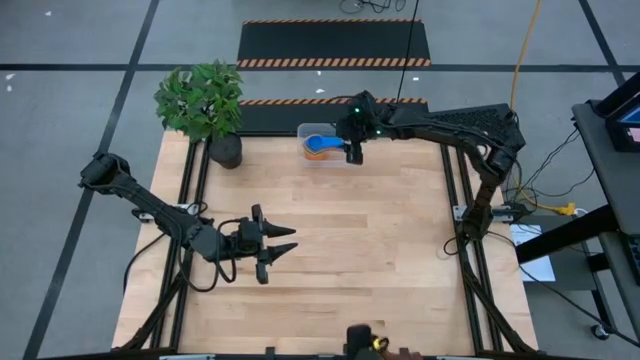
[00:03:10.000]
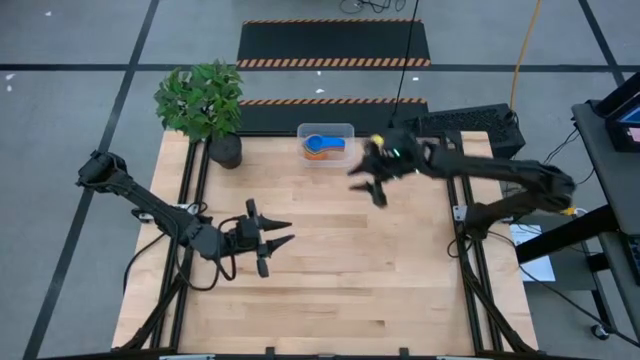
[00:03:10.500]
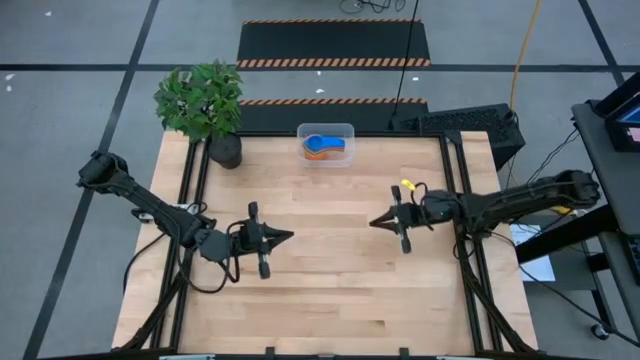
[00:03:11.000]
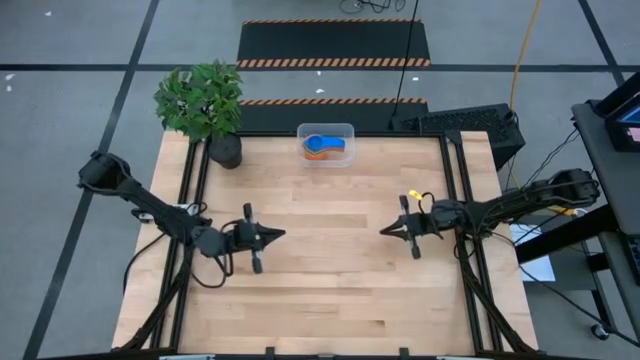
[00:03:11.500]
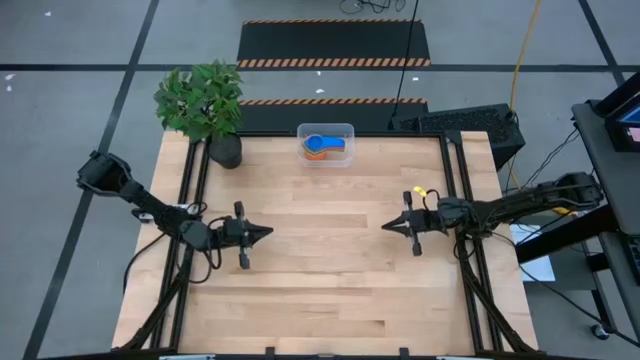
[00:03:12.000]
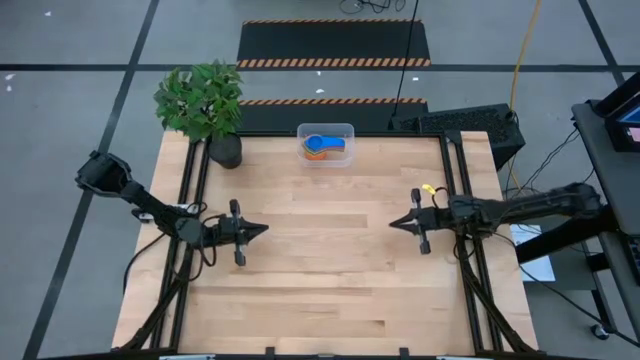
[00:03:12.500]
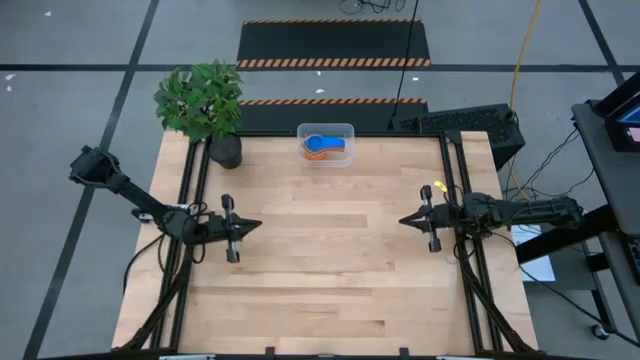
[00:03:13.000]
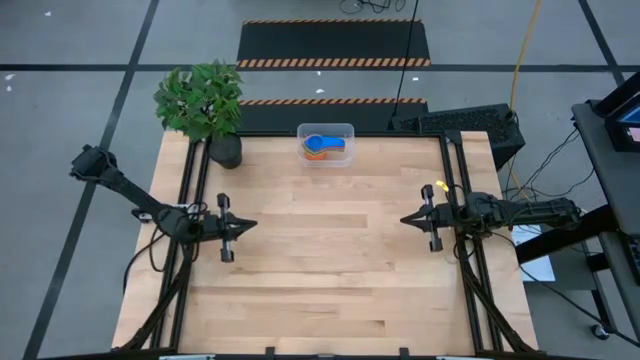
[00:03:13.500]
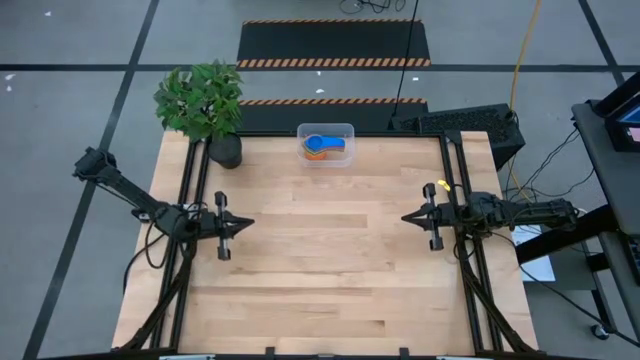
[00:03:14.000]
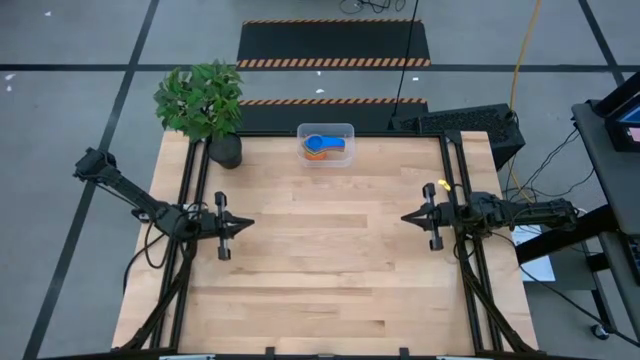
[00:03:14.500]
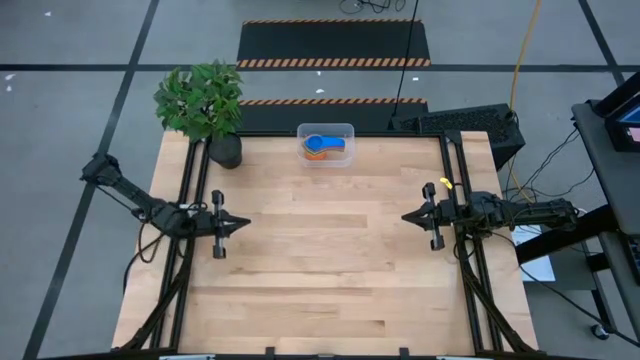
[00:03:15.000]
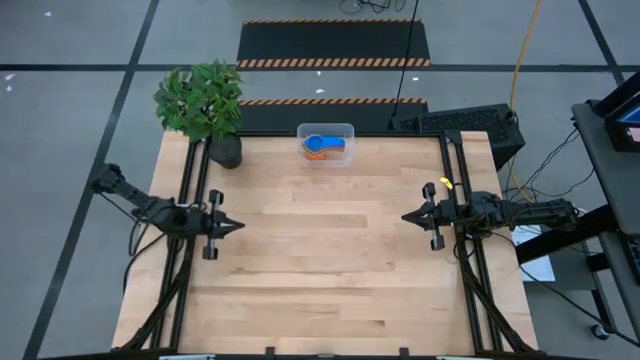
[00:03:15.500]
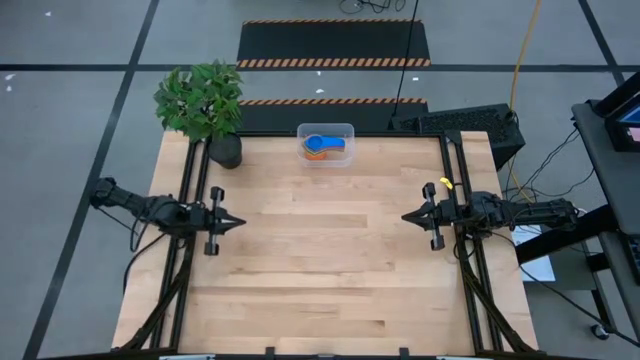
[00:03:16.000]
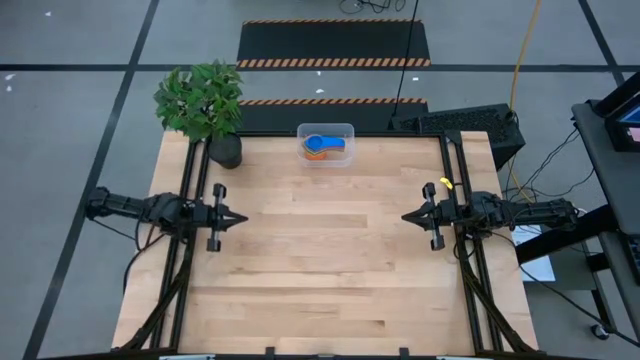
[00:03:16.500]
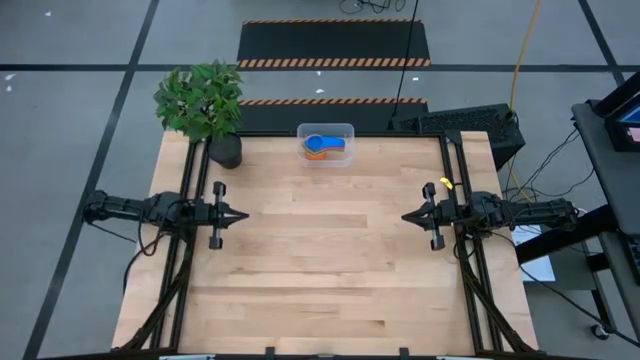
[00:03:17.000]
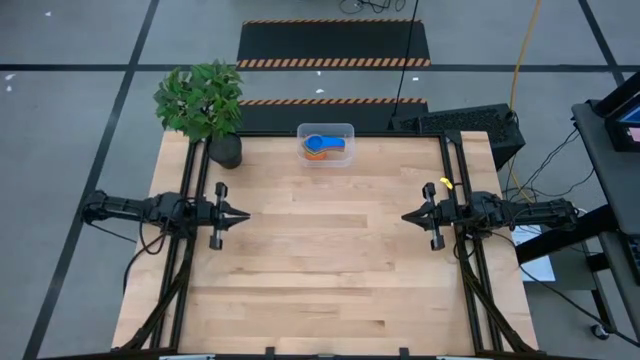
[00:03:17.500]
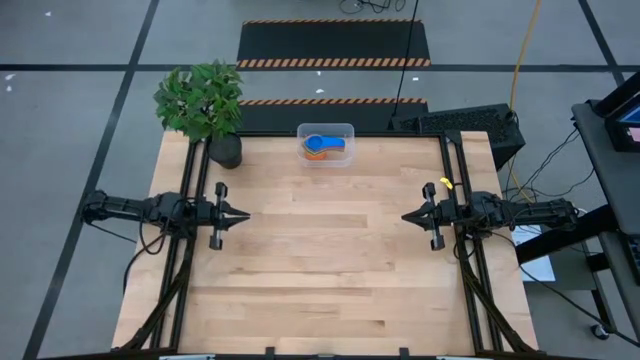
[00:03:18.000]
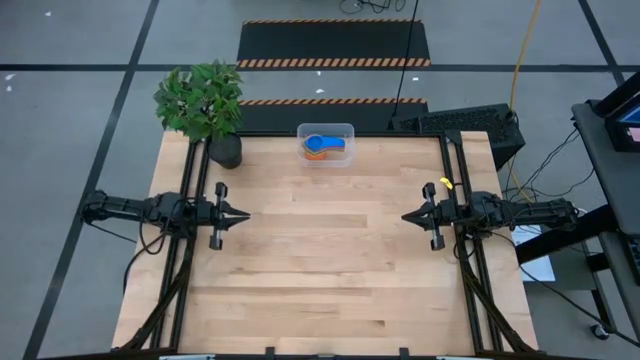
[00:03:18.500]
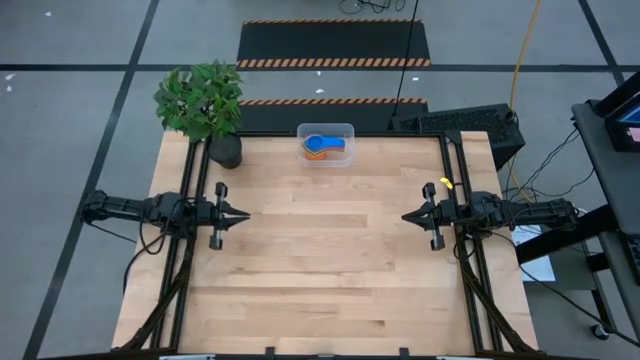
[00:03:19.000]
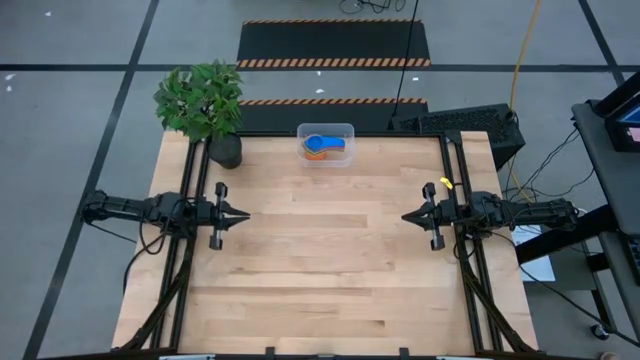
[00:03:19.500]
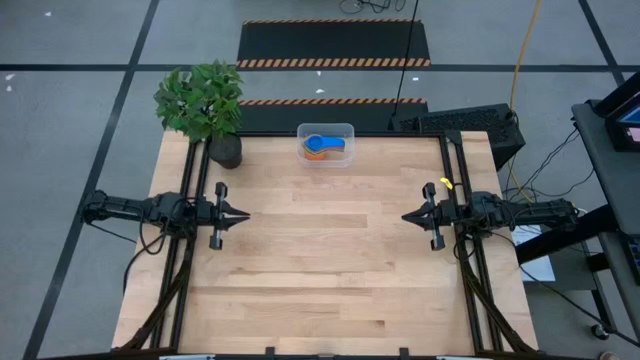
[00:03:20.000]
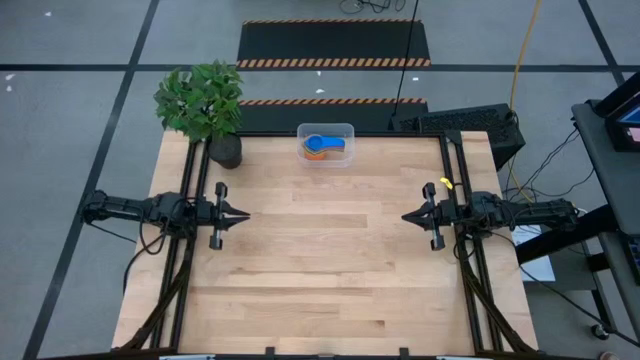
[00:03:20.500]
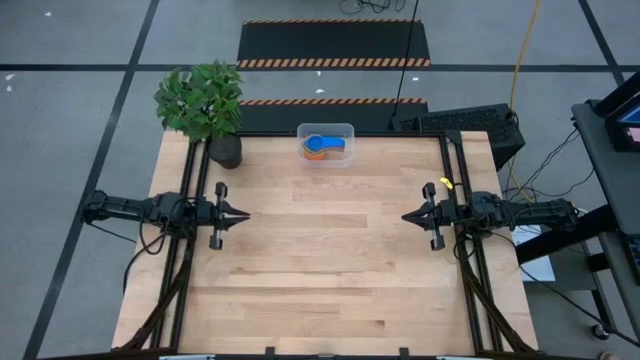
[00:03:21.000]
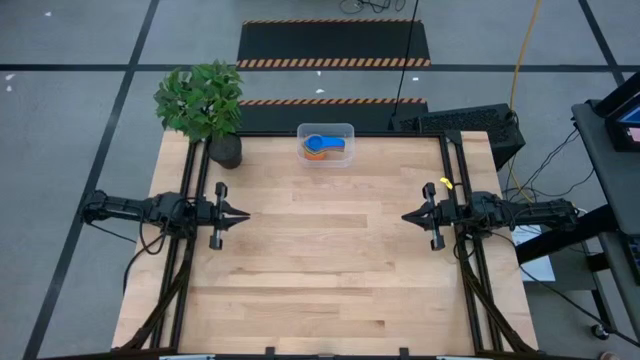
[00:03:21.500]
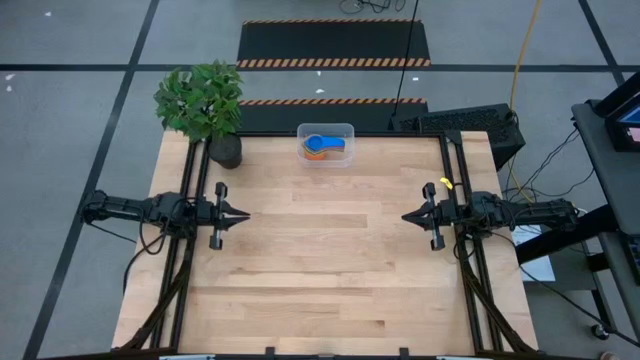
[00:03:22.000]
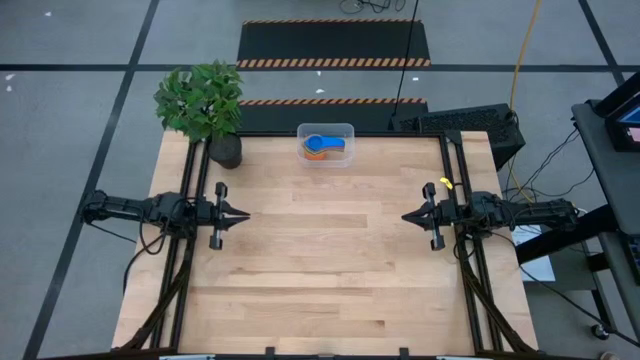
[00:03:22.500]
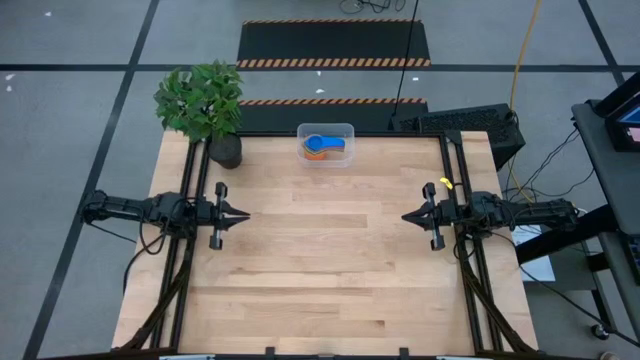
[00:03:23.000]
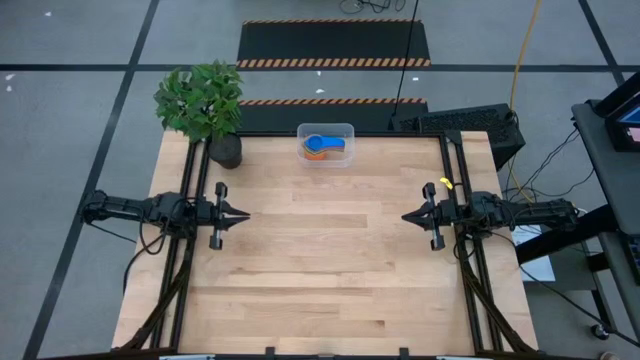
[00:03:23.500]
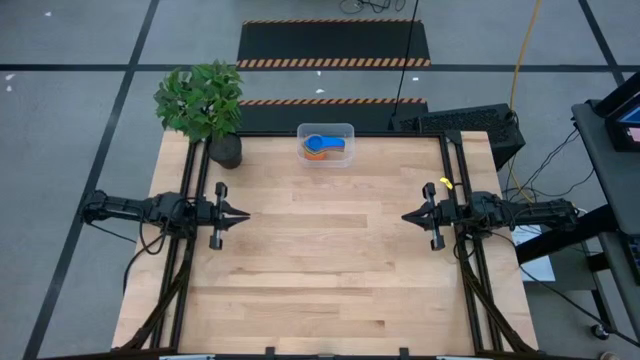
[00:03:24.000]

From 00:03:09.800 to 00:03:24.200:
Task: Nest measuring cups in basket
Return to Home Position

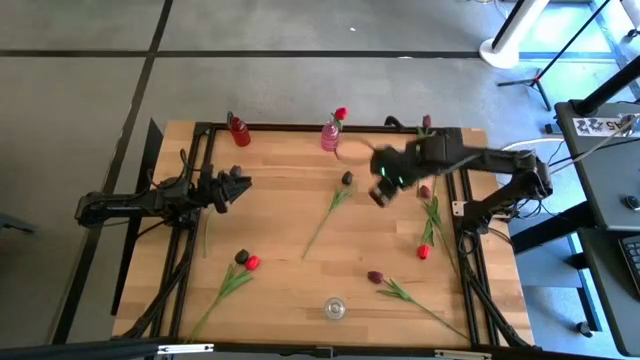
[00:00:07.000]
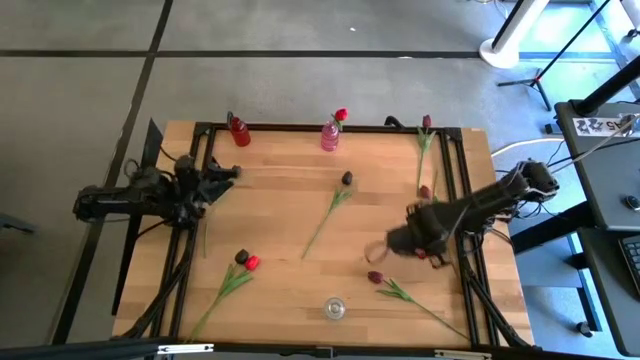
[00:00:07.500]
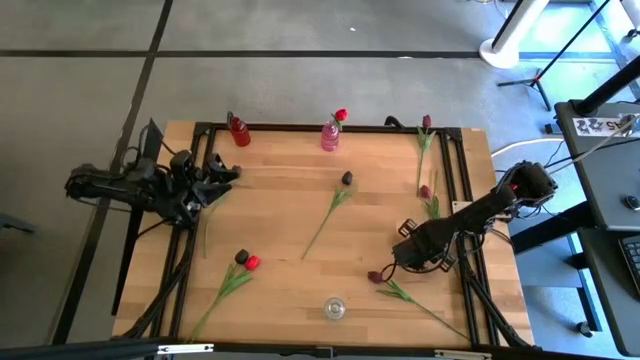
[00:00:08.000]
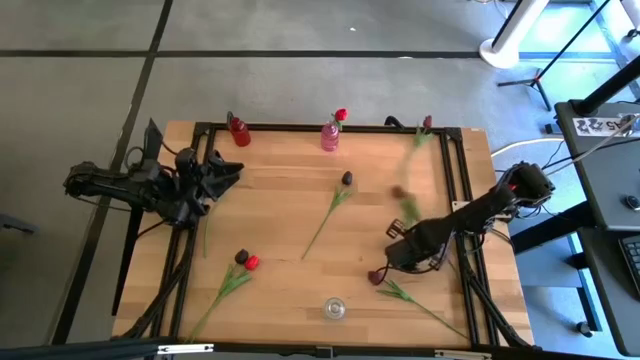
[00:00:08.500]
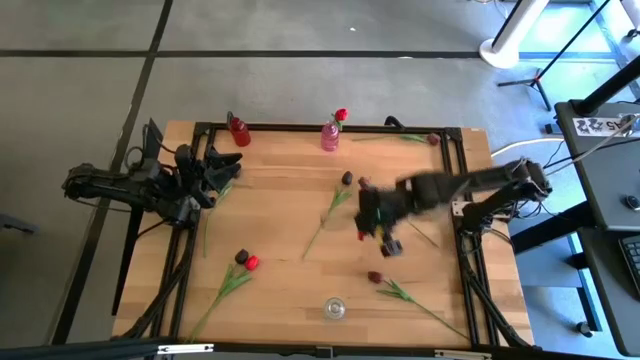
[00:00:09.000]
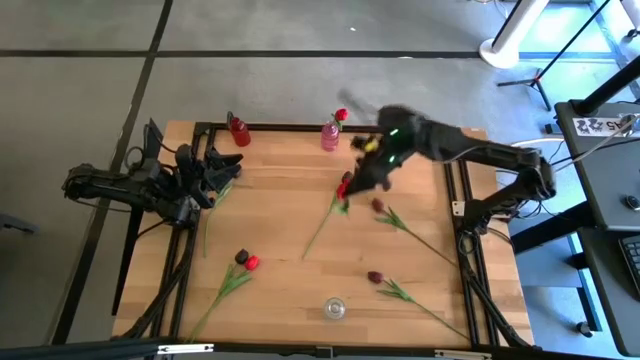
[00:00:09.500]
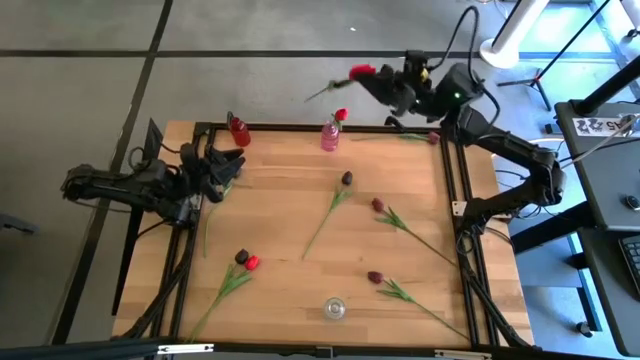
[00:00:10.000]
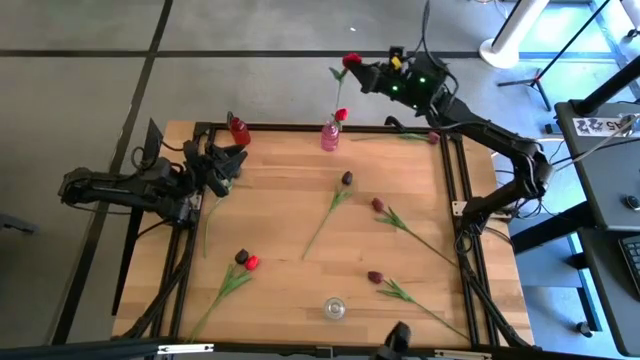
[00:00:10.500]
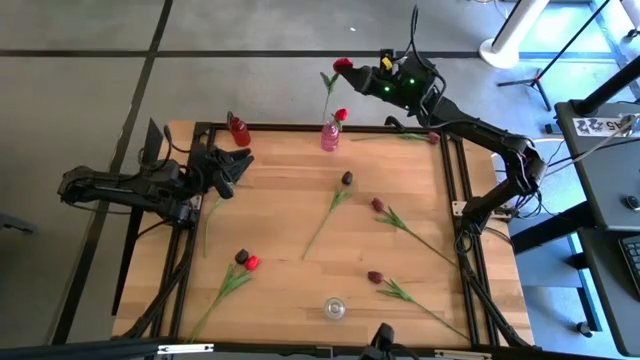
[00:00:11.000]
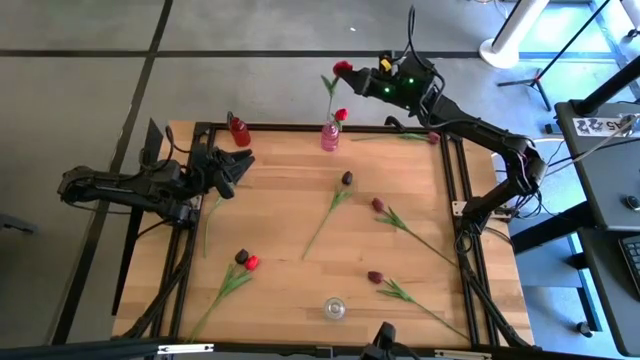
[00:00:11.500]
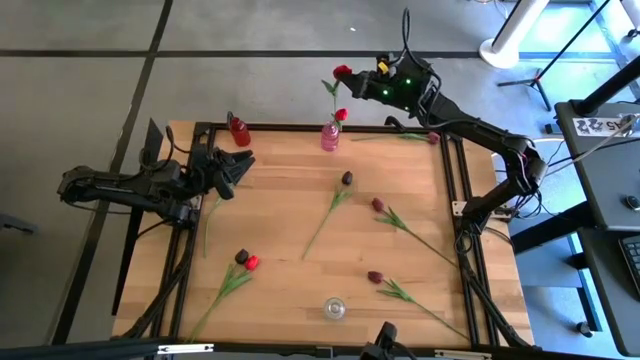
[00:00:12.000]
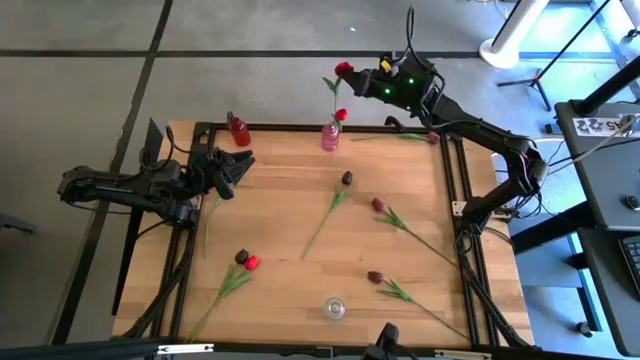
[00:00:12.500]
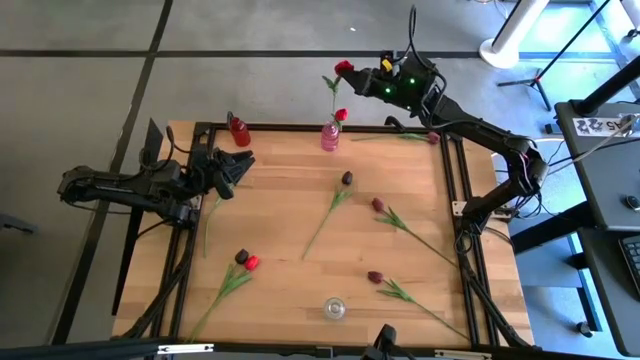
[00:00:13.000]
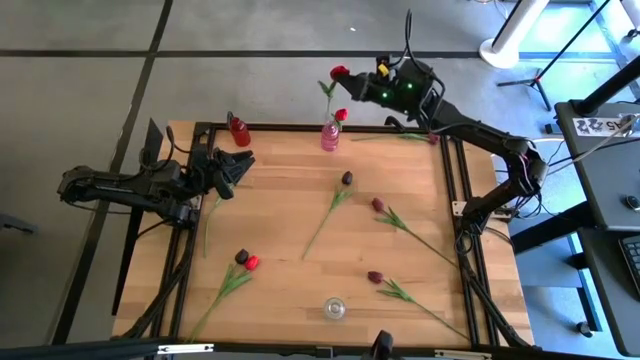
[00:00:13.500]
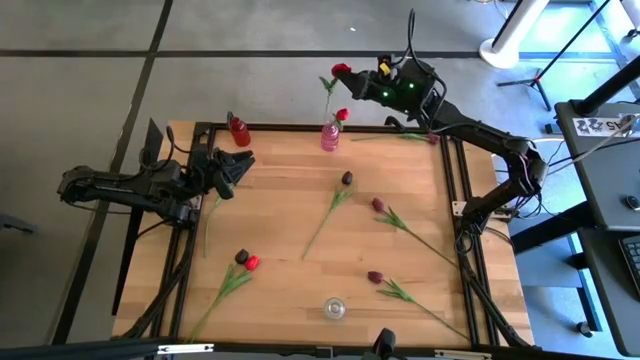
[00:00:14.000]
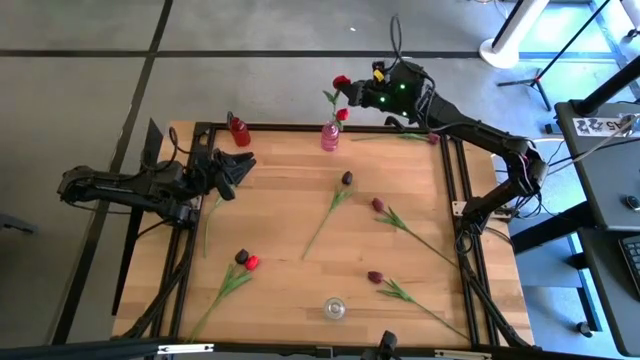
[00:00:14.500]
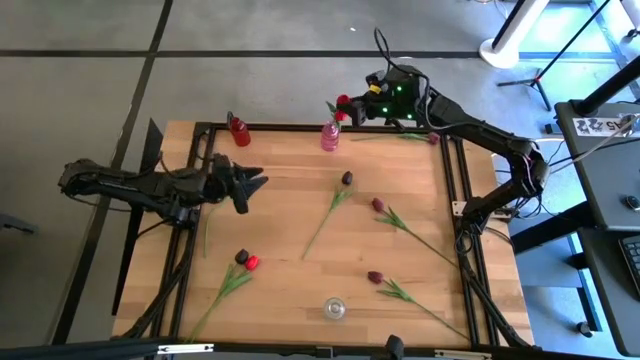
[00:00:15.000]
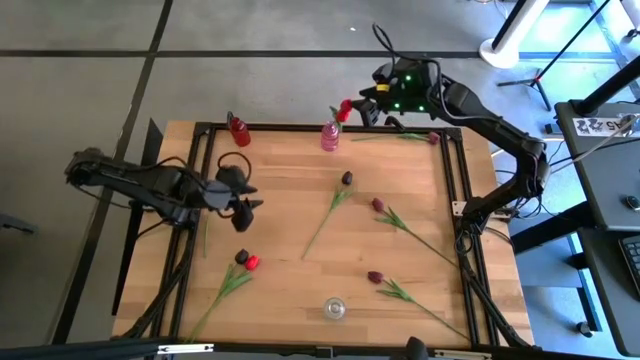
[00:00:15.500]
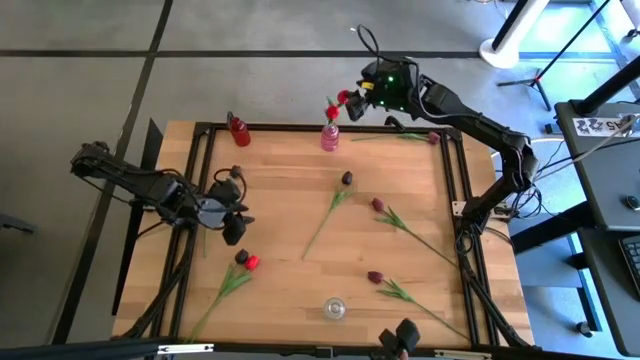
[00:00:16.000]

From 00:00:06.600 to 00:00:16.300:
Task: Sort flowers into vase by color
Put the right red flower into the pink flower vase
